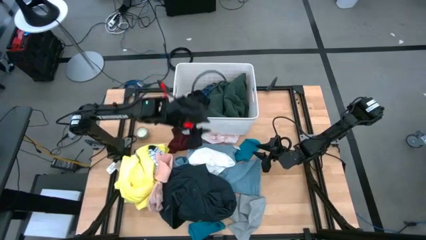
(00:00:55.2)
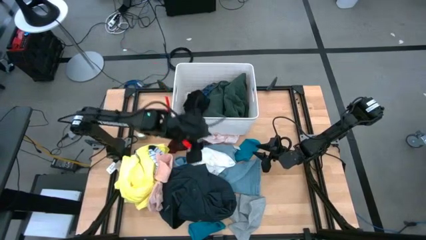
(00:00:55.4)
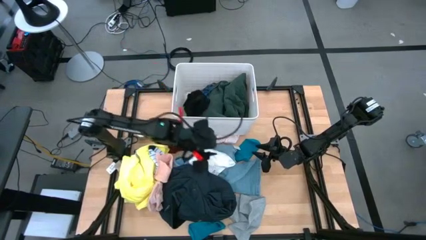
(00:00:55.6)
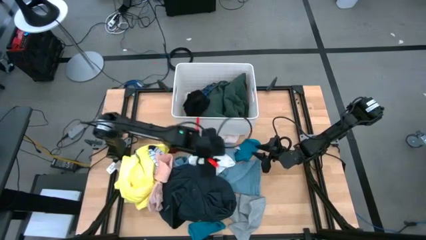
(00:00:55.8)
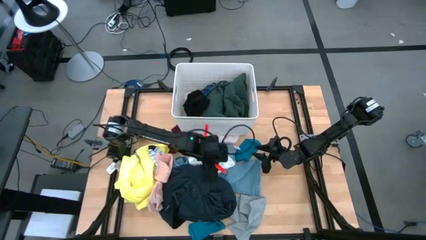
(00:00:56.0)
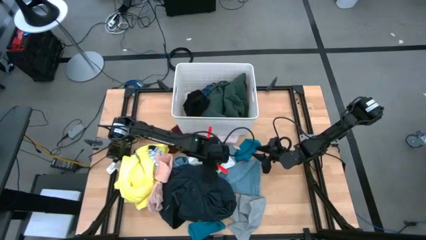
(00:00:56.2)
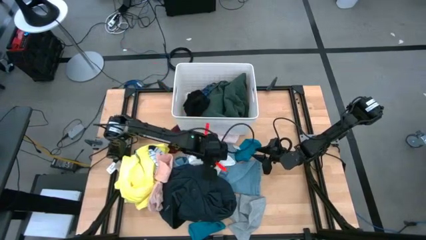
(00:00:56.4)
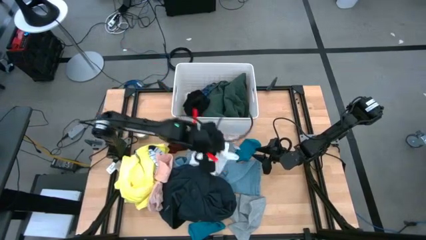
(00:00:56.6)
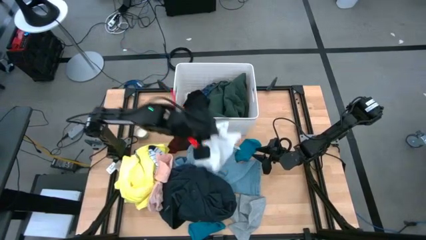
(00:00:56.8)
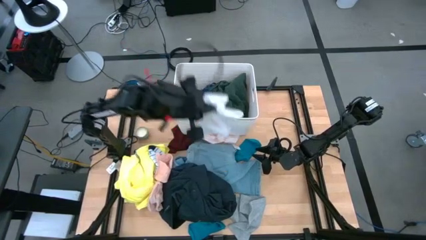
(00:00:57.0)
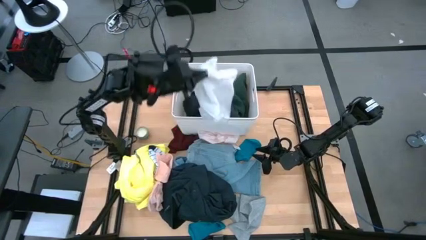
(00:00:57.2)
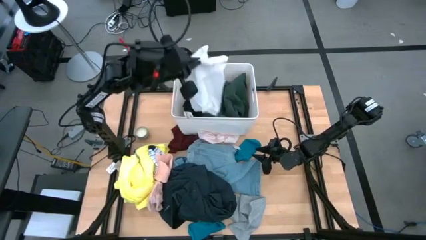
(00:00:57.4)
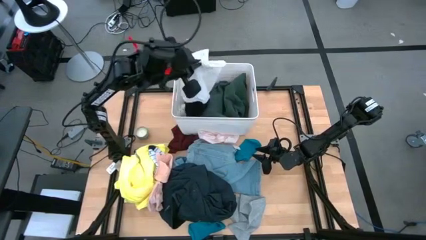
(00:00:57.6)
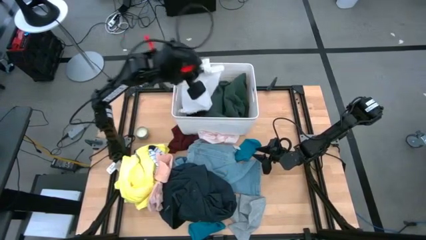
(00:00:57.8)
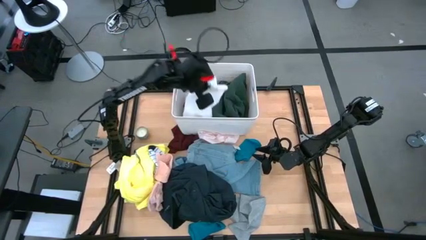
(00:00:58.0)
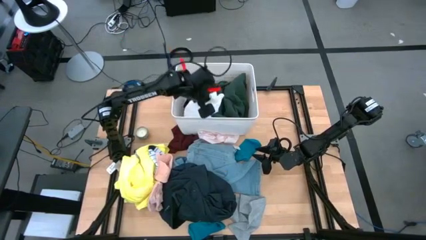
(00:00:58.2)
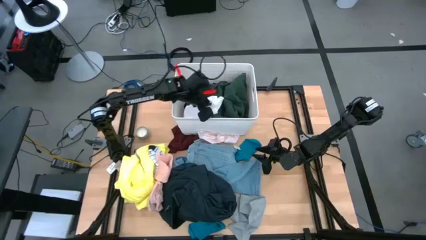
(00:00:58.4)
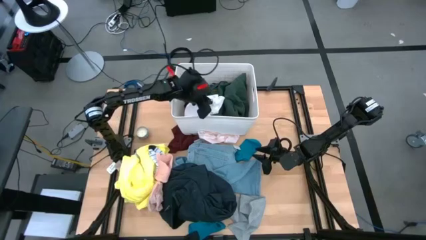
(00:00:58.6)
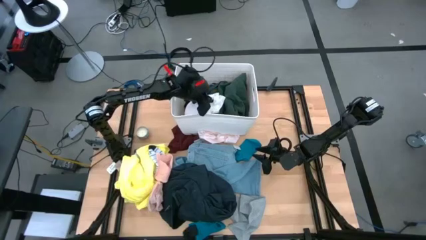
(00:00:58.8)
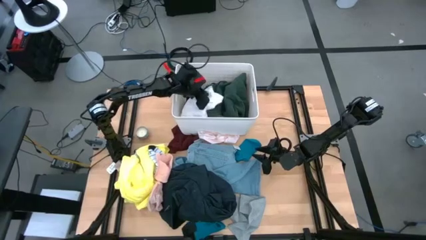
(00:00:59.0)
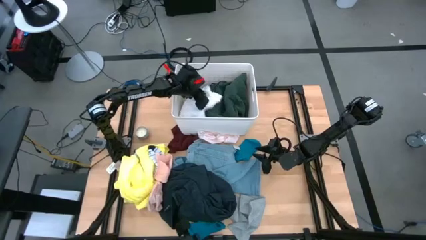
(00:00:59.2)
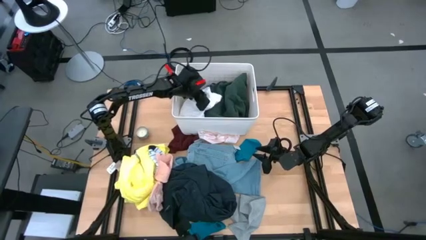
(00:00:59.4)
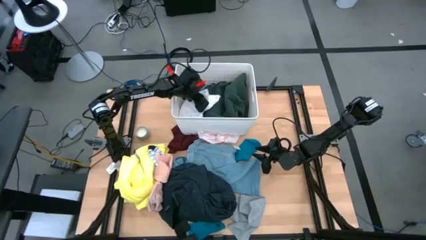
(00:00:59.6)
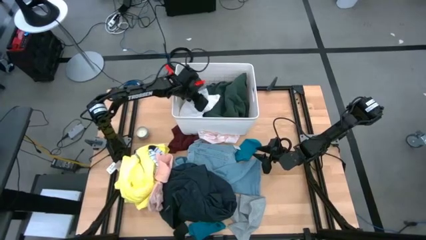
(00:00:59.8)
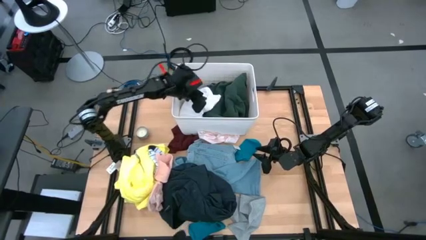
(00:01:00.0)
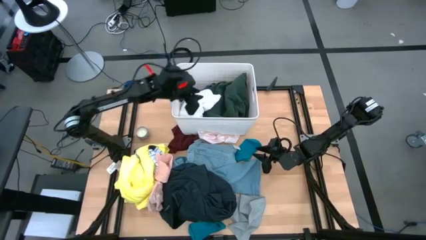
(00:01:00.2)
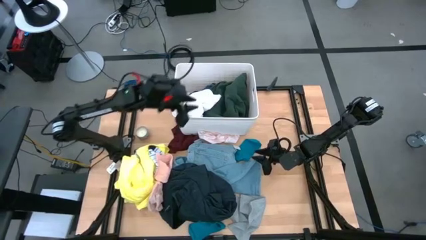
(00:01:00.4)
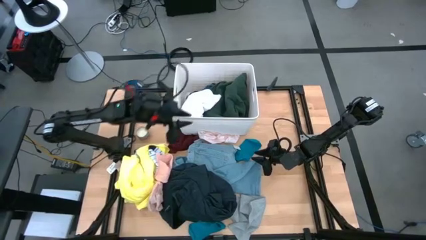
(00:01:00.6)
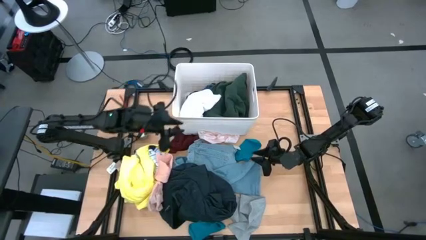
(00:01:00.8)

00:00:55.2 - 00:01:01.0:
Task: Sort clothes
Put the white shirt into the white laundry bin

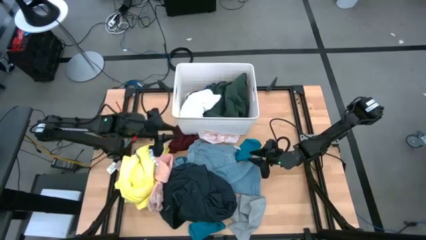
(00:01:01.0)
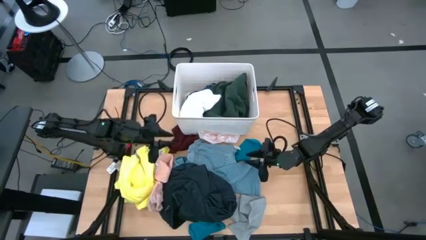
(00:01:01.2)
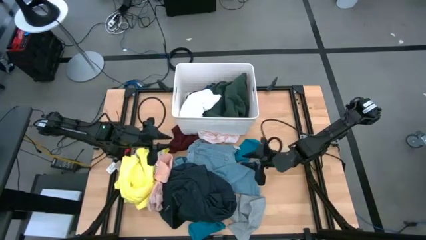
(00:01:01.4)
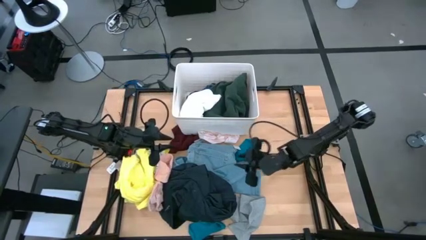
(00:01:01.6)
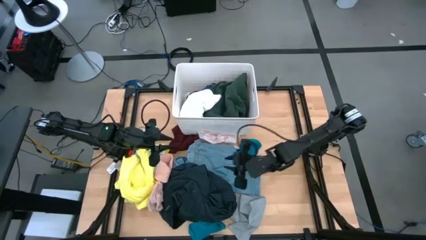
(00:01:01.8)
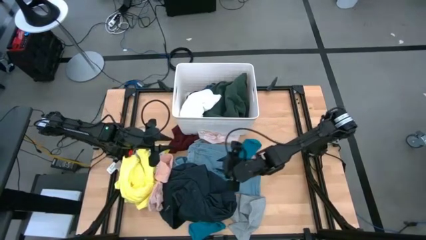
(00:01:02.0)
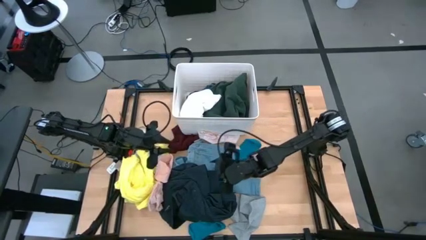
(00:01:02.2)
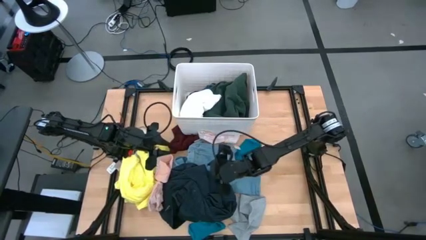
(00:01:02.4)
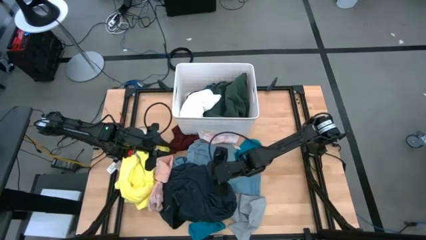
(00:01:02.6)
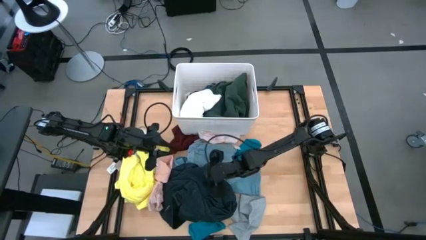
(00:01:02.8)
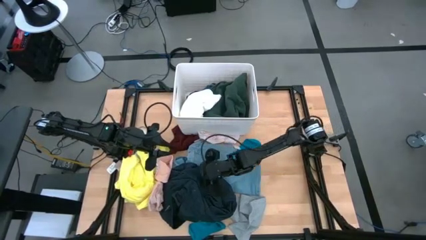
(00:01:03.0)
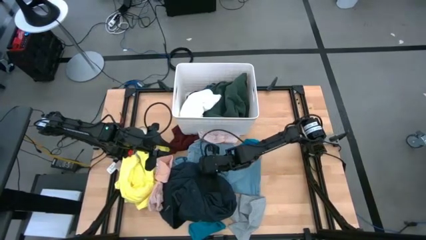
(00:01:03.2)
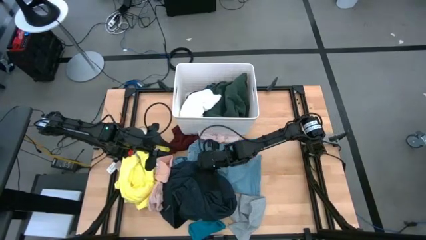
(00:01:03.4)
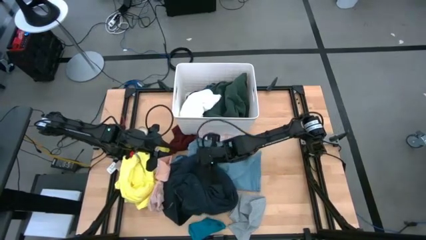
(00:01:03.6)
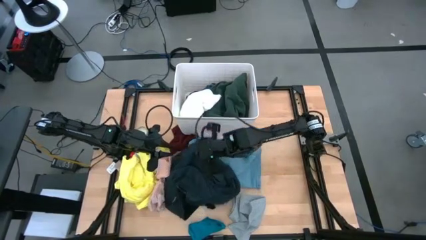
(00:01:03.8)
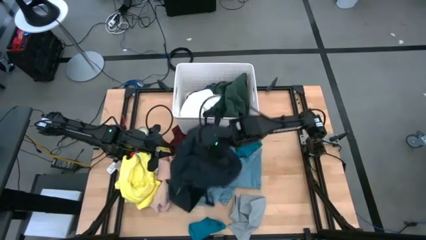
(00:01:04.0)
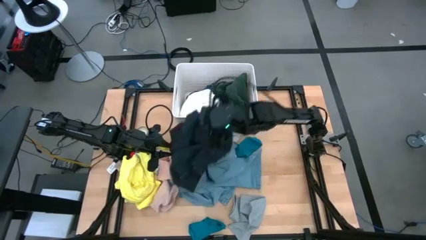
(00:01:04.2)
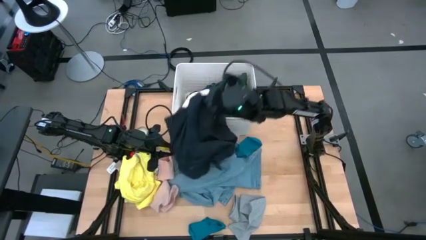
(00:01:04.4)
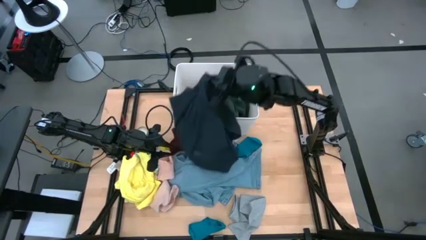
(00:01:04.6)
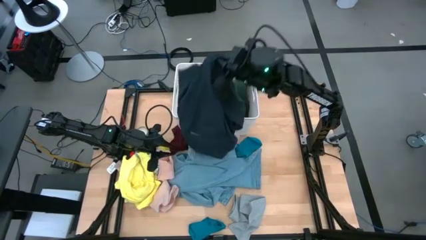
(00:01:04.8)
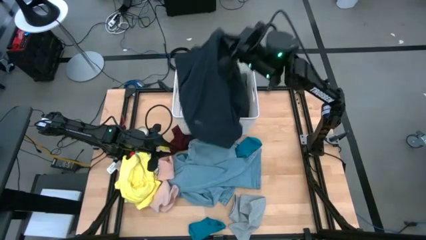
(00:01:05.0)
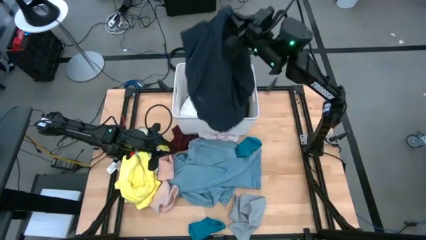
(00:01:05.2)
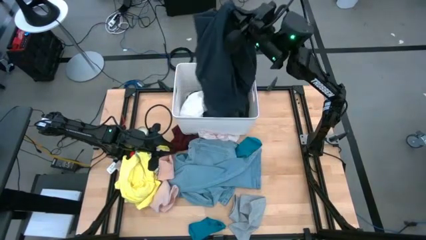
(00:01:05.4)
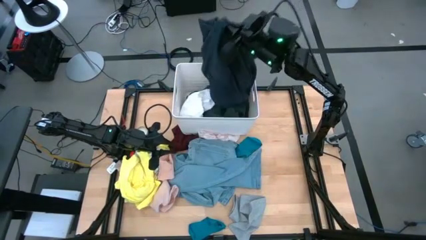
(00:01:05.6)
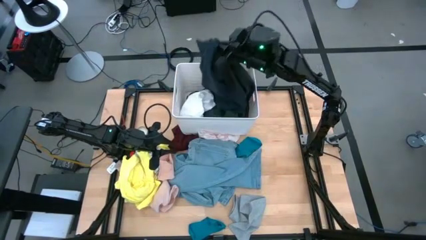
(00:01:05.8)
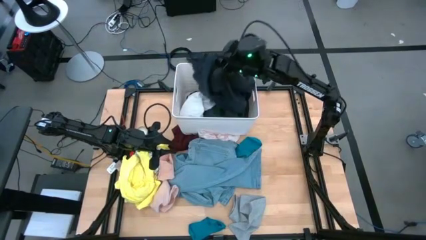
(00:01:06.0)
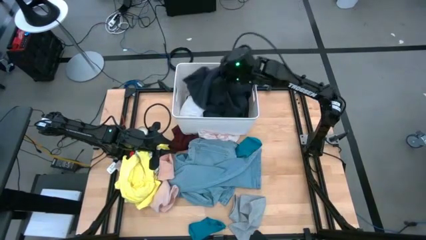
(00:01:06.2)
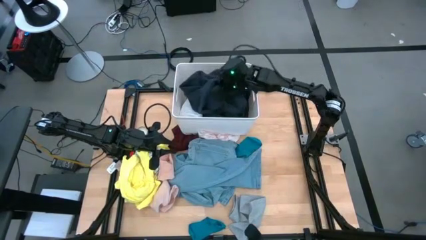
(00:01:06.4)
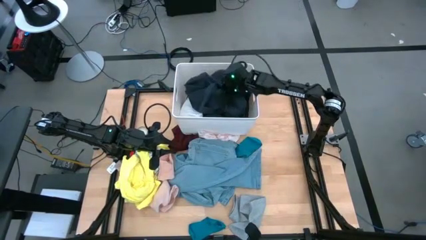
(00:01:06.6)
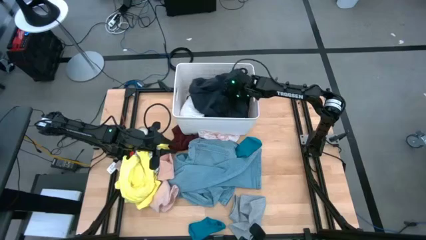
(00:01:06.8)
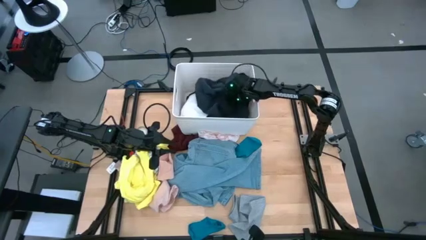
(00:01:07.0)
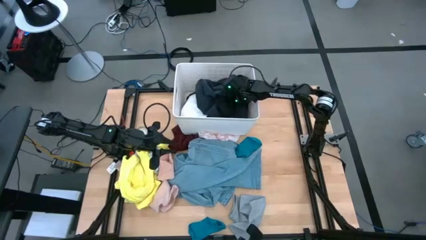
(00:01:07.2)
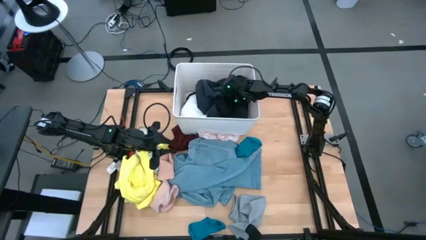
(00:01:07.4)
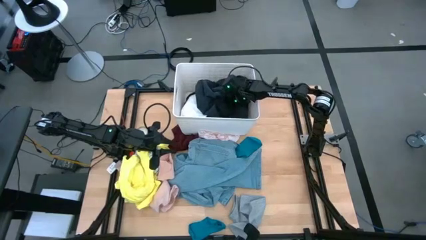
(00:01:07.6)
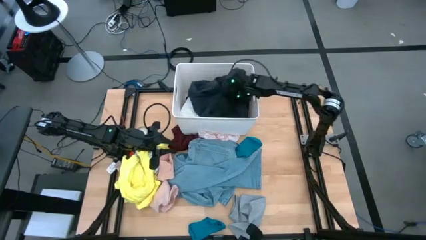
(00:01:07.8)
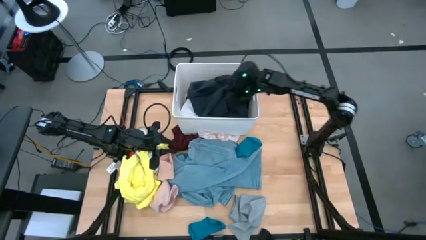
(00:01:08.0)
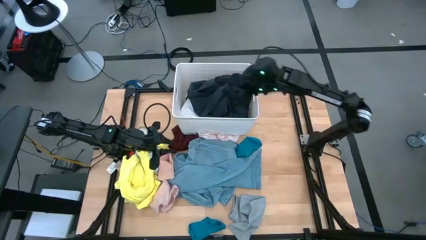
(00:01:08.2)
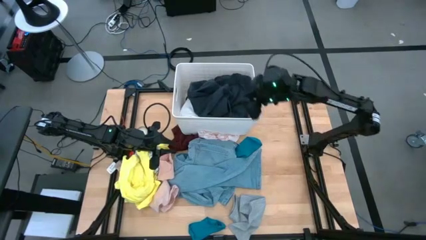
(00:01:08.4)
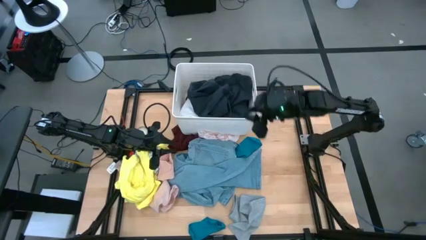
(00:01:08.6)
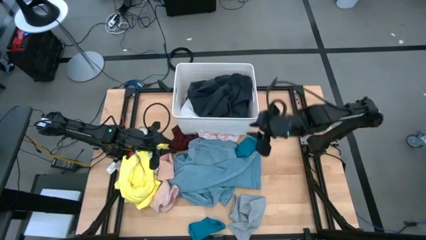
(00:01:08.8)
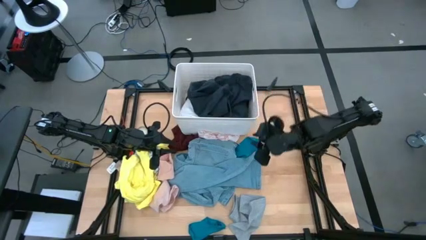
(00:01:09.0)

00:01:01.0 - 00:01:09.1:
Put the blue jacket into the white laundry bin

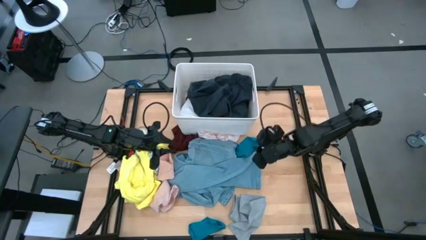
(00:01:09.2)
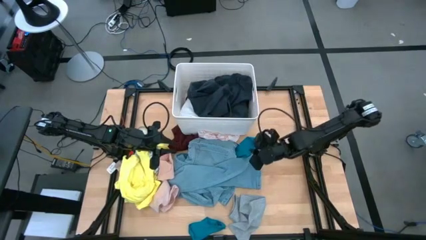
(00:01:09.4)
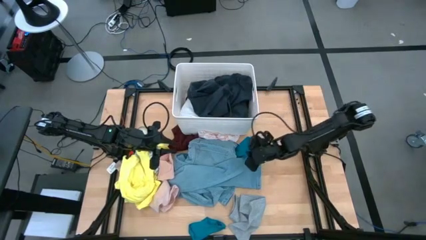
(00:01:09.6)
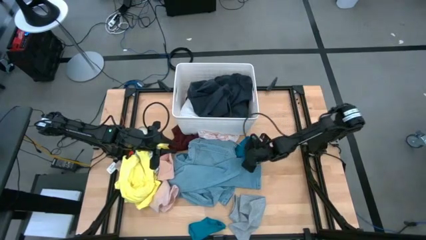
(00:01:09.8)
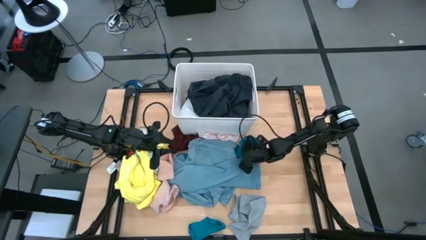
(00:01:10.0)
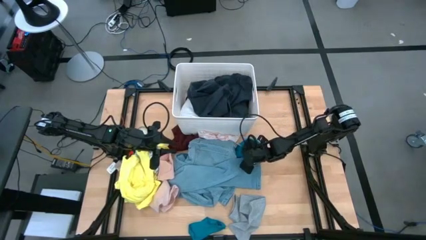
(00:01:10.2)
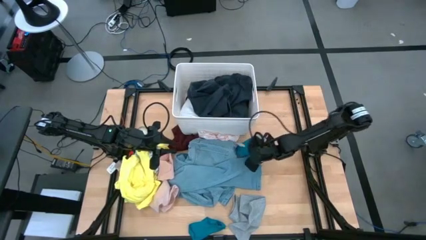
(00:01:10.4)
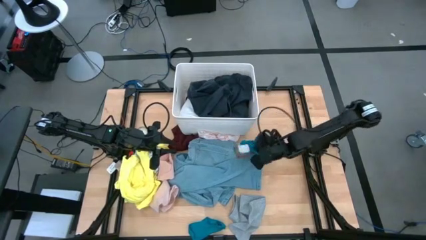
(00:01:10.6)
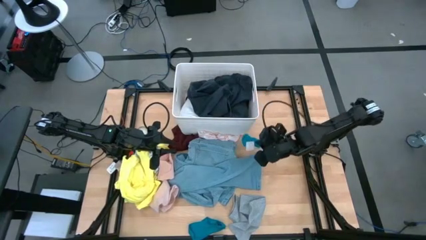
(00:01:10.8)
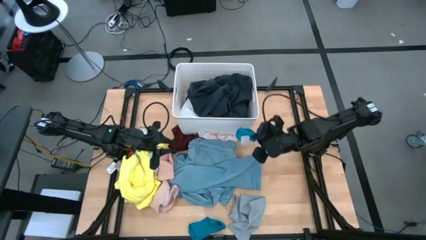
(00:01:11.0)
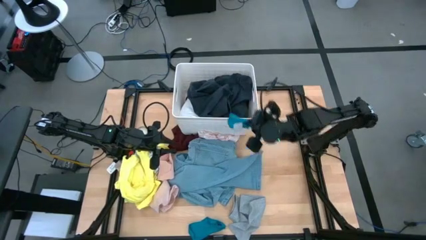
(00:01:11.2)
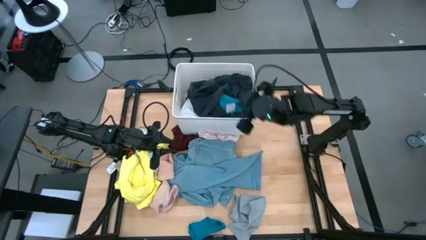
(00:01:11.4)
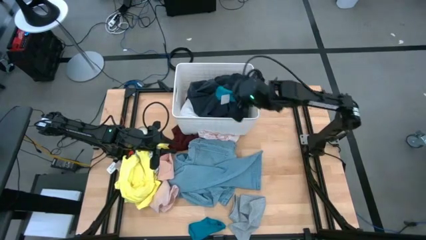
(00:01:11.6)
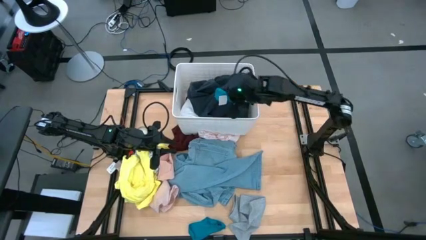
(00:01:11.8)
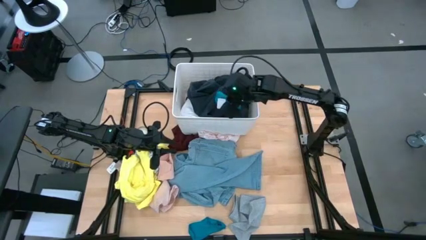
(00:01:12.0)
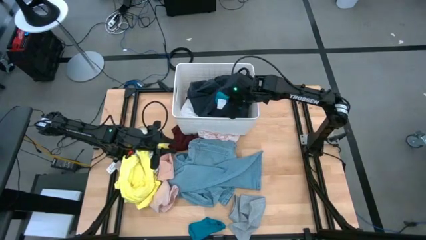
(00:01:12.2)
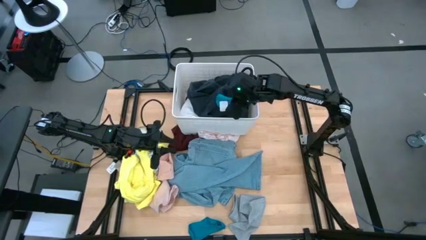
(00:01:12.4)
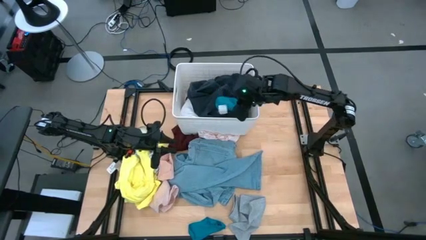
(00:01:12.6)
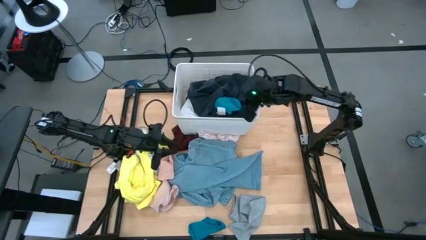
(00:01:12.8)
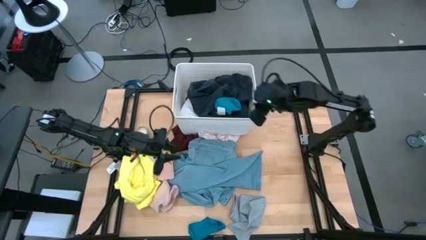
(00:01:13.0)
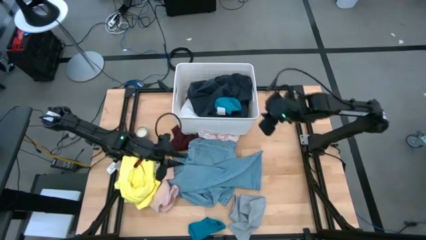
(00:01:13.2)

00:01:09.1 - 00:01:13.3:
Put the top blue sock into the white laundry bin
